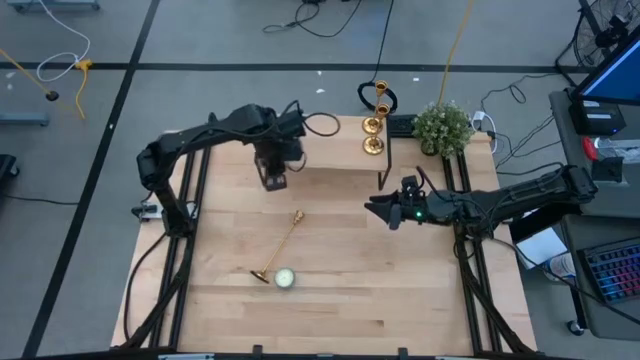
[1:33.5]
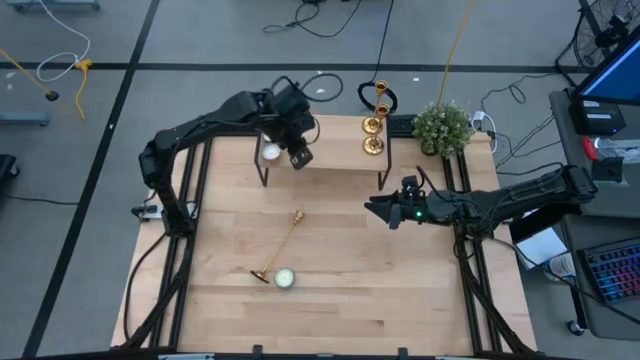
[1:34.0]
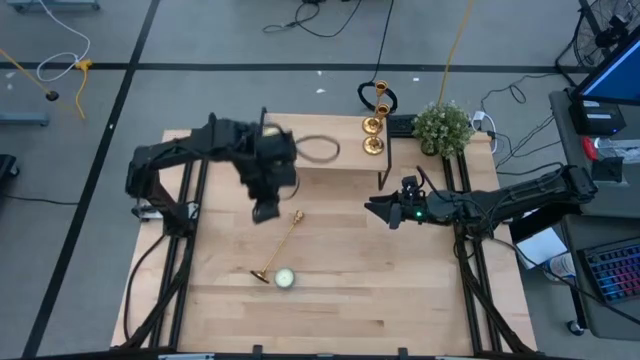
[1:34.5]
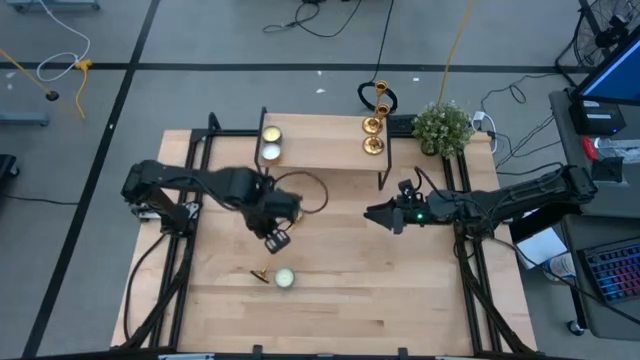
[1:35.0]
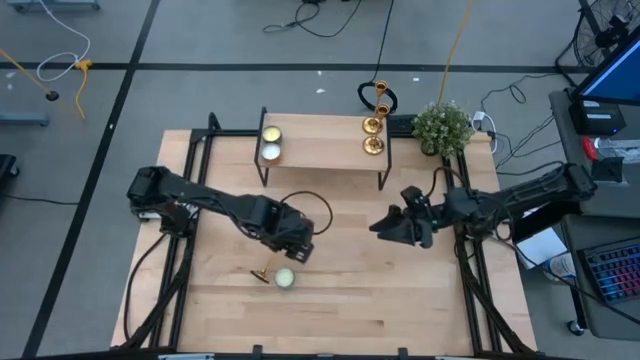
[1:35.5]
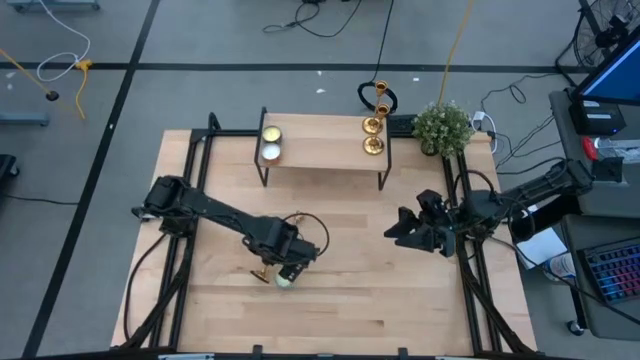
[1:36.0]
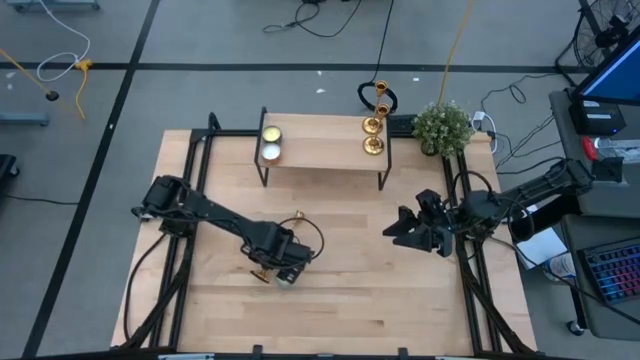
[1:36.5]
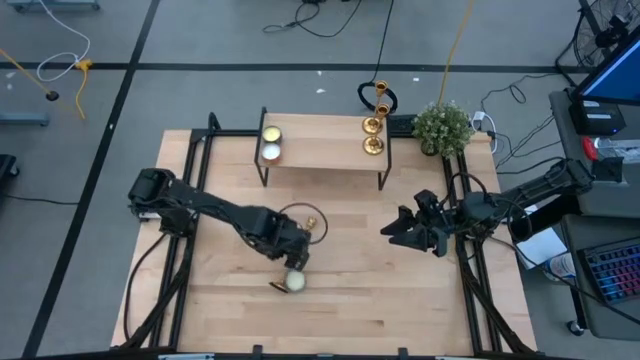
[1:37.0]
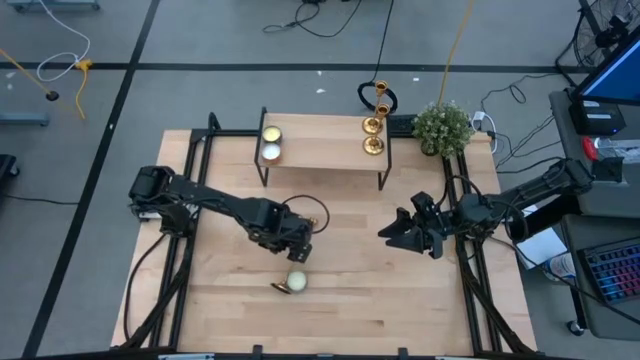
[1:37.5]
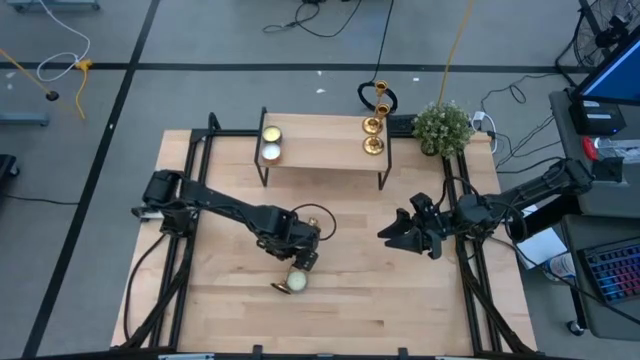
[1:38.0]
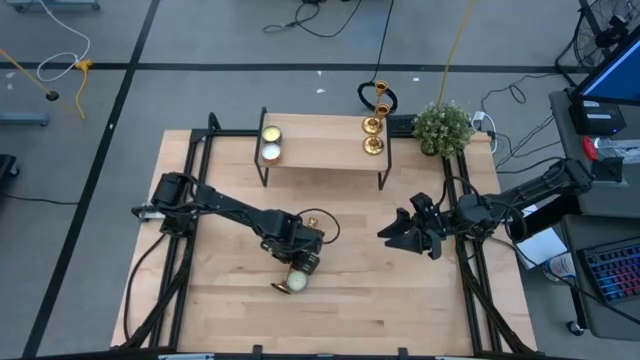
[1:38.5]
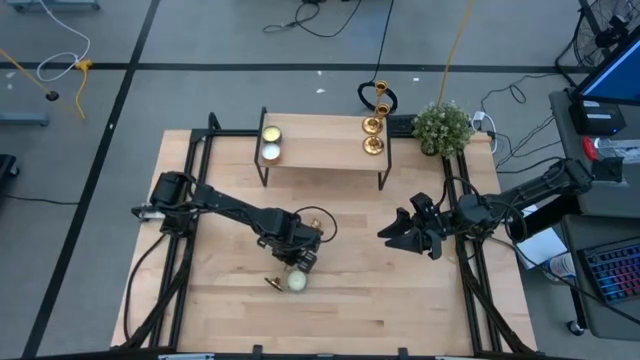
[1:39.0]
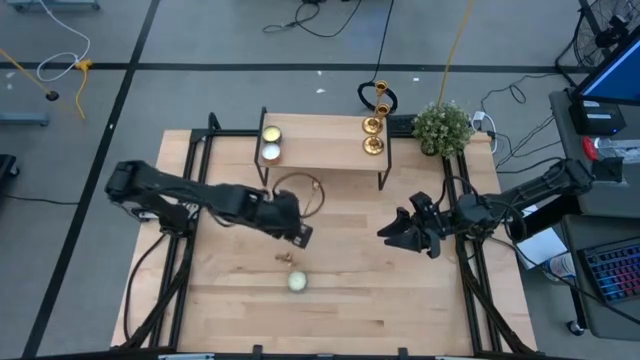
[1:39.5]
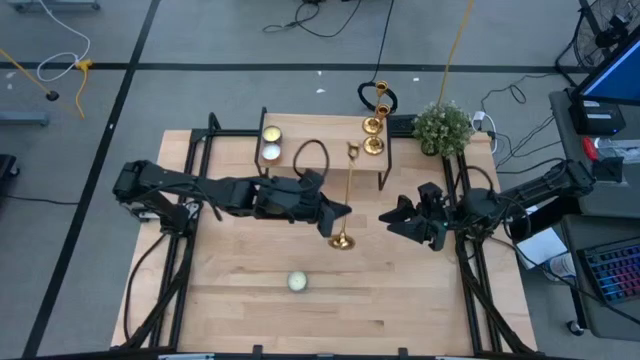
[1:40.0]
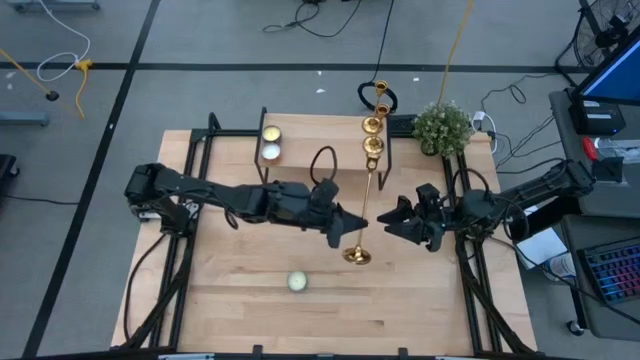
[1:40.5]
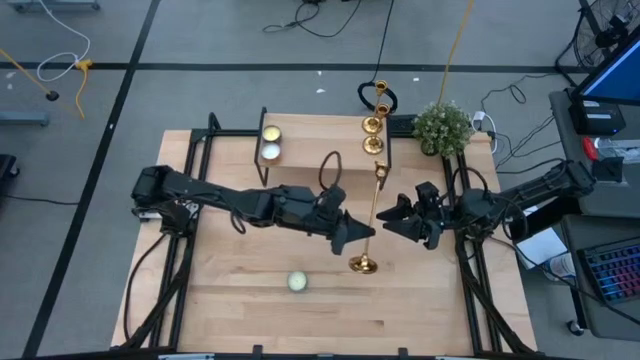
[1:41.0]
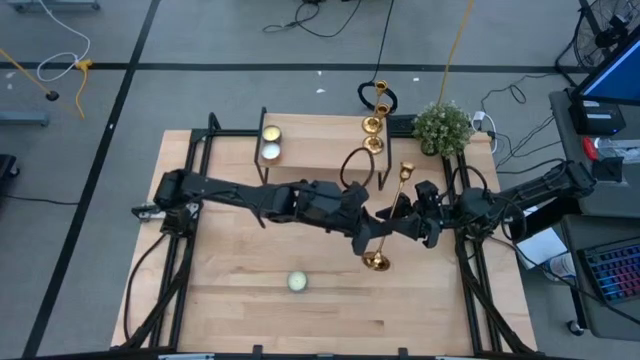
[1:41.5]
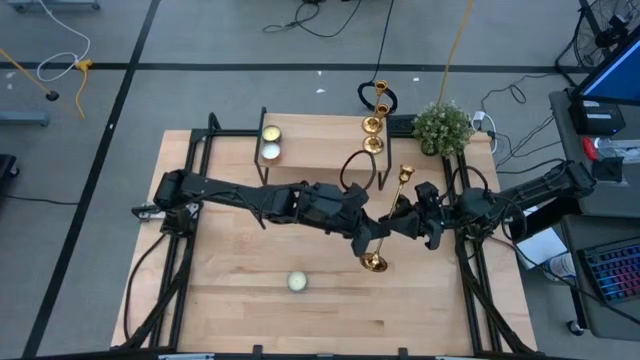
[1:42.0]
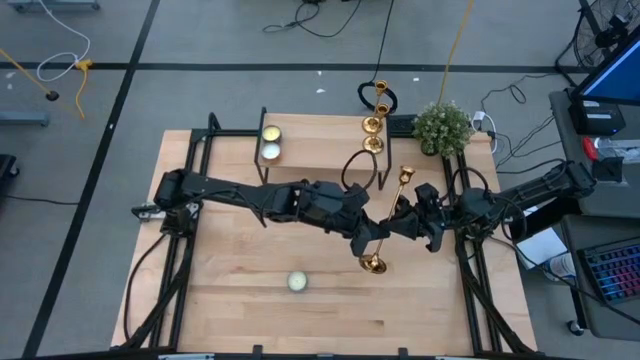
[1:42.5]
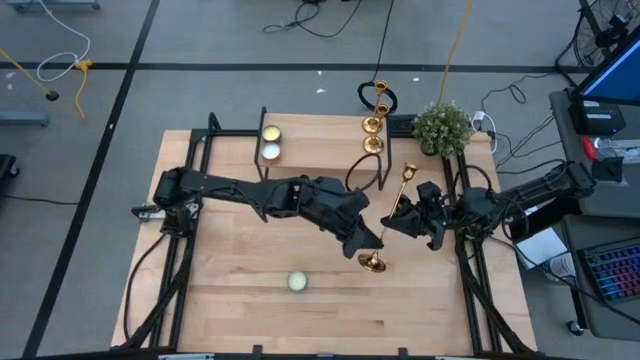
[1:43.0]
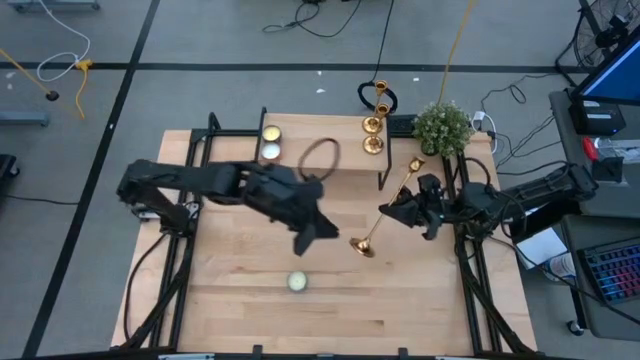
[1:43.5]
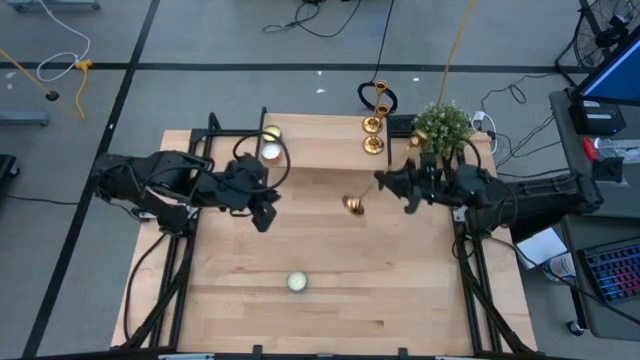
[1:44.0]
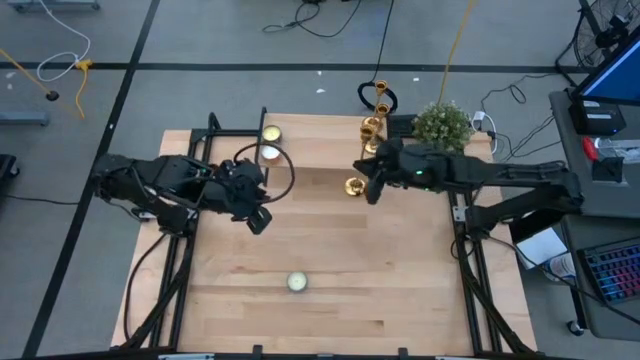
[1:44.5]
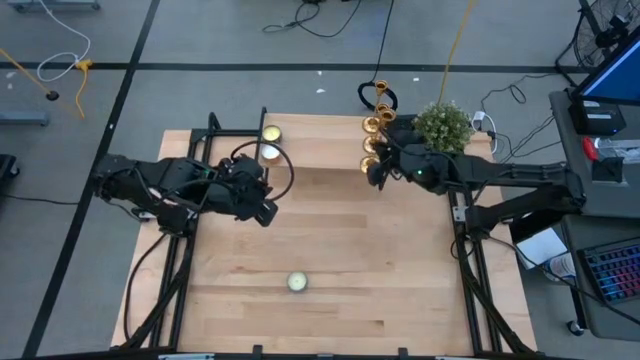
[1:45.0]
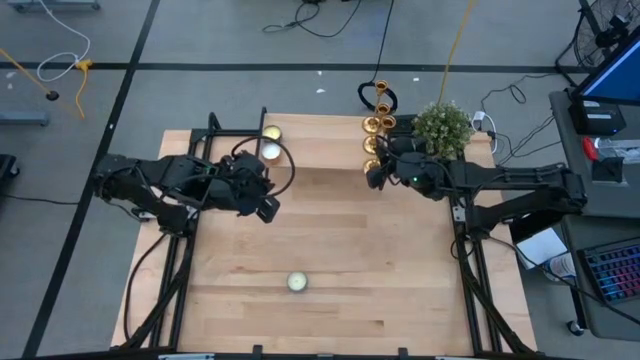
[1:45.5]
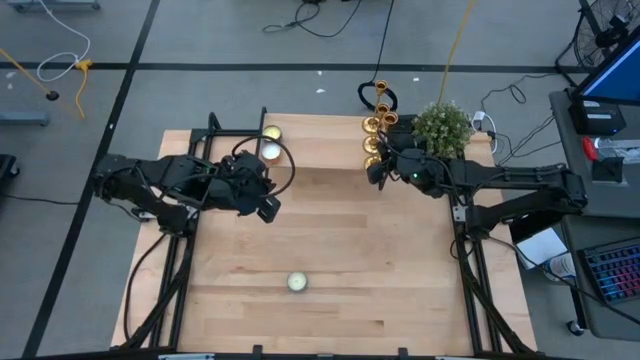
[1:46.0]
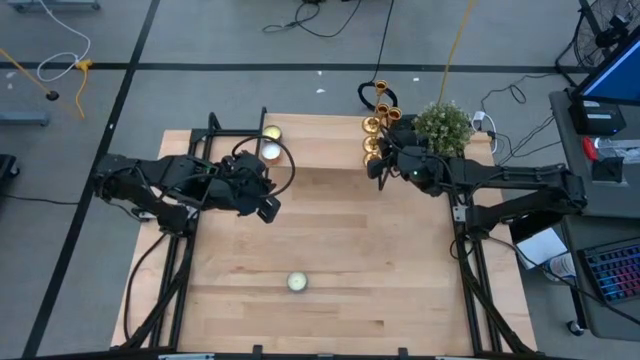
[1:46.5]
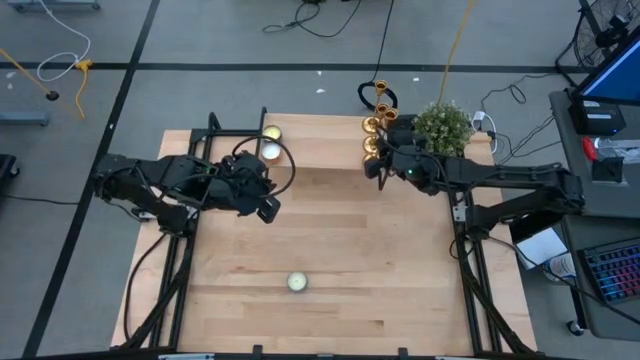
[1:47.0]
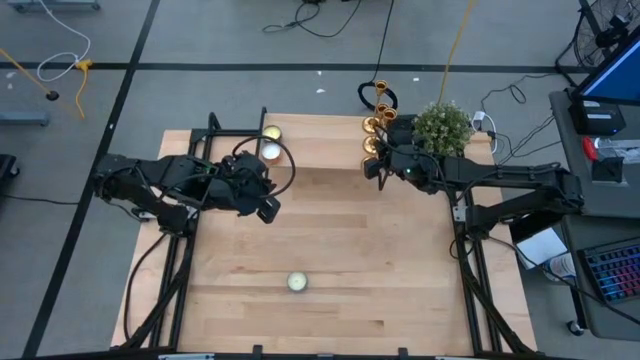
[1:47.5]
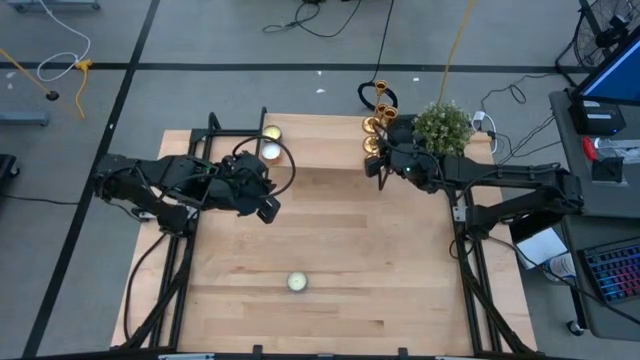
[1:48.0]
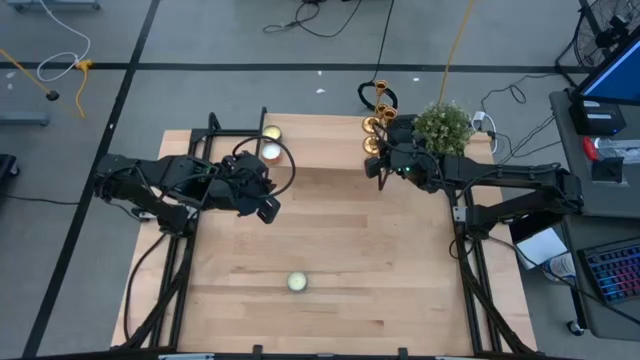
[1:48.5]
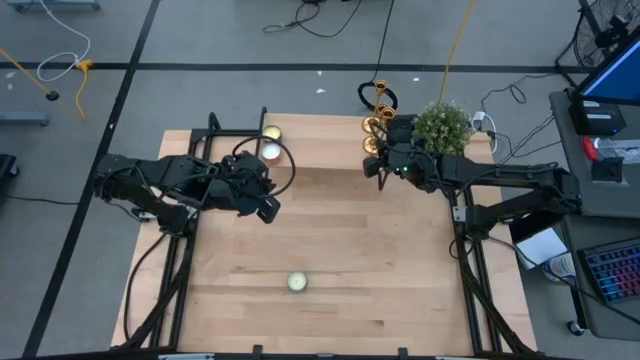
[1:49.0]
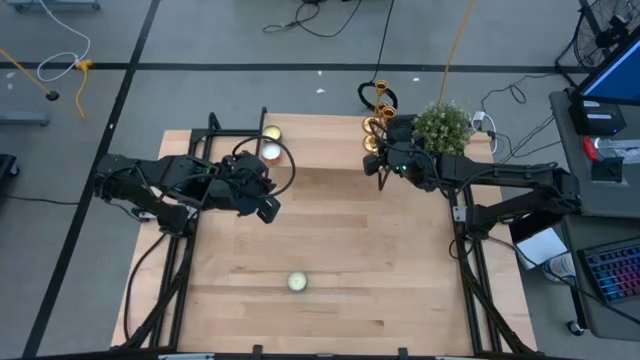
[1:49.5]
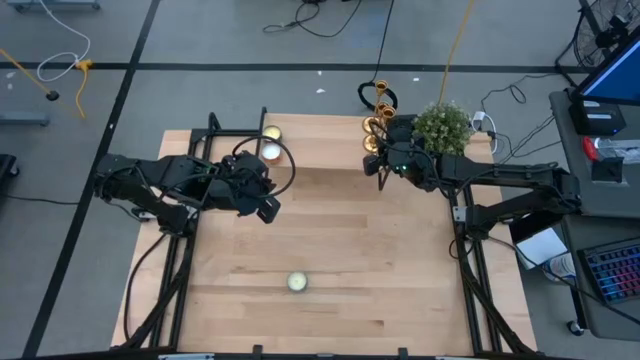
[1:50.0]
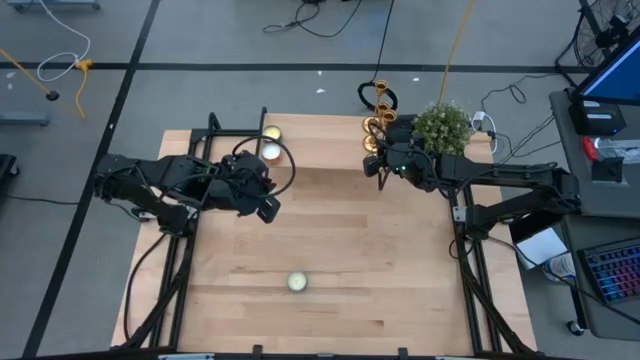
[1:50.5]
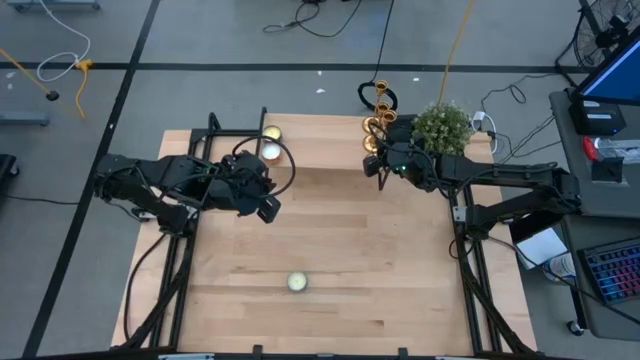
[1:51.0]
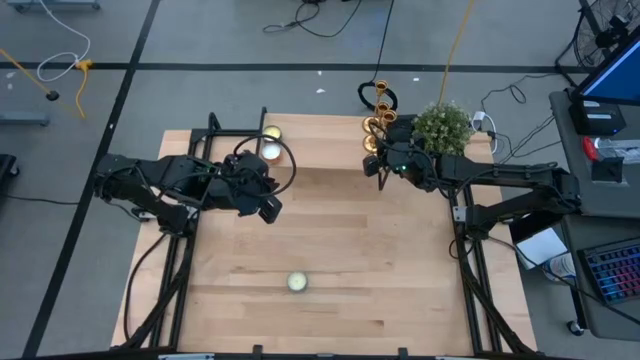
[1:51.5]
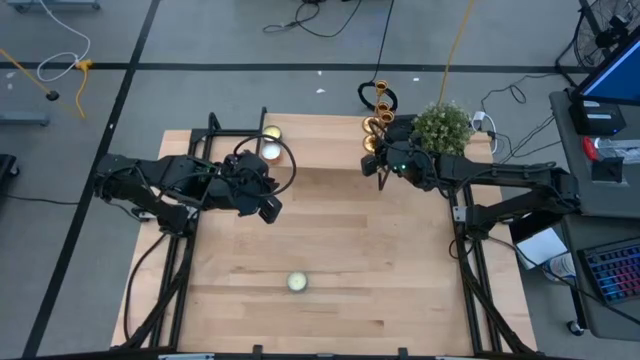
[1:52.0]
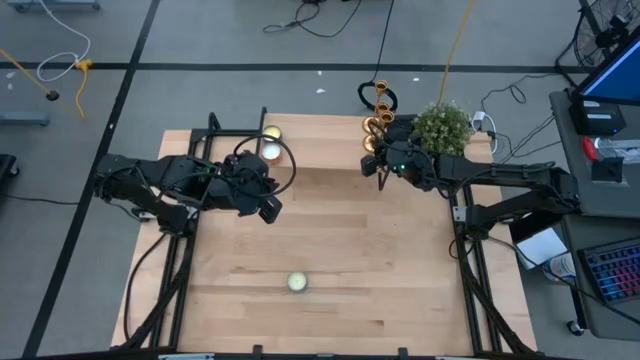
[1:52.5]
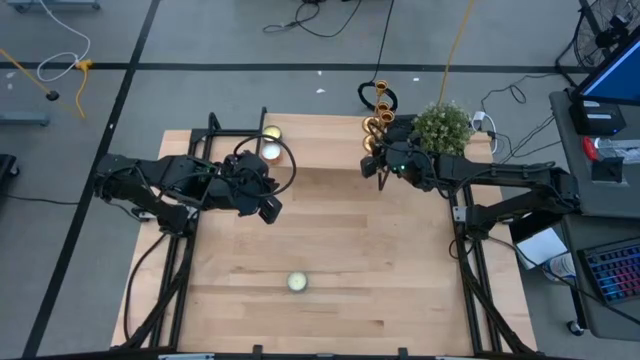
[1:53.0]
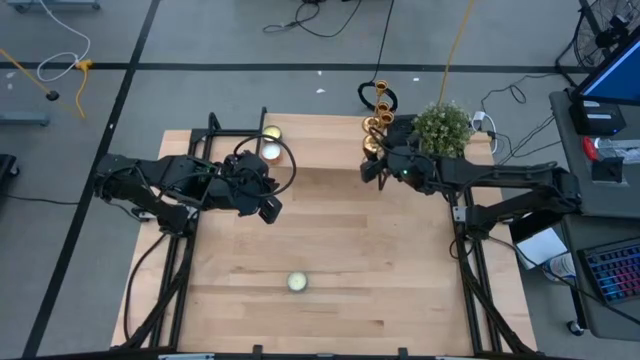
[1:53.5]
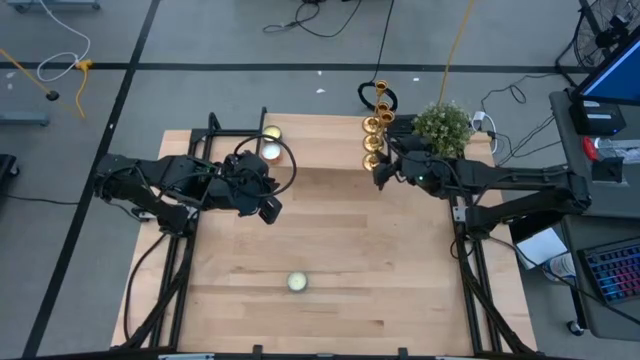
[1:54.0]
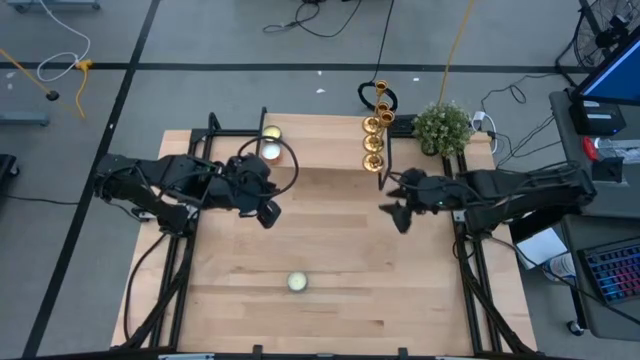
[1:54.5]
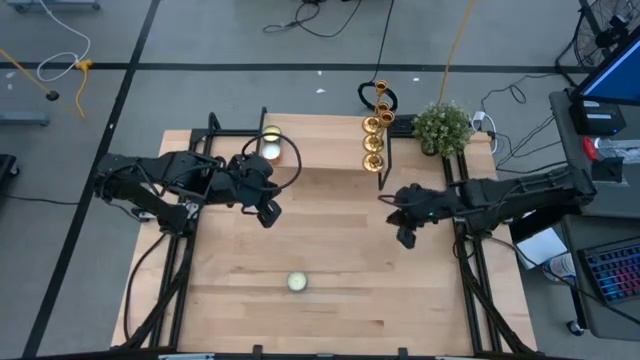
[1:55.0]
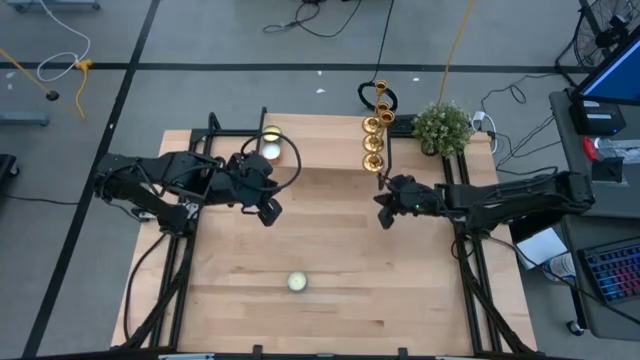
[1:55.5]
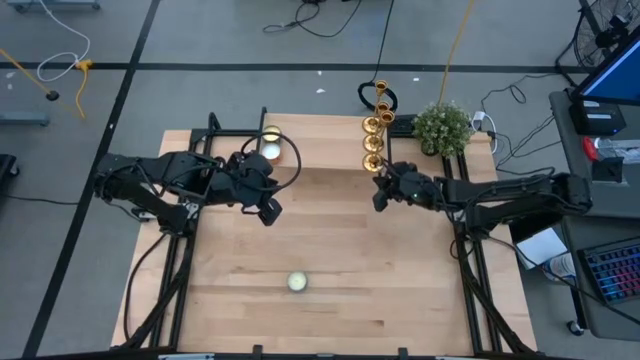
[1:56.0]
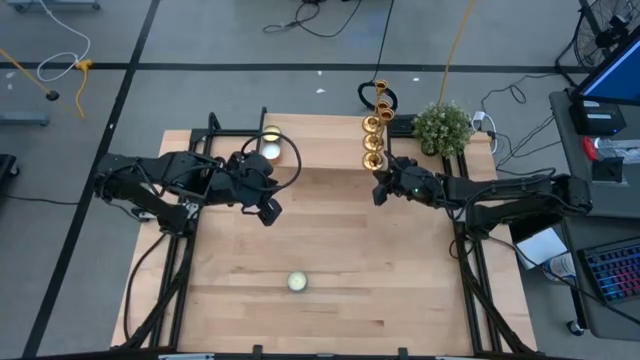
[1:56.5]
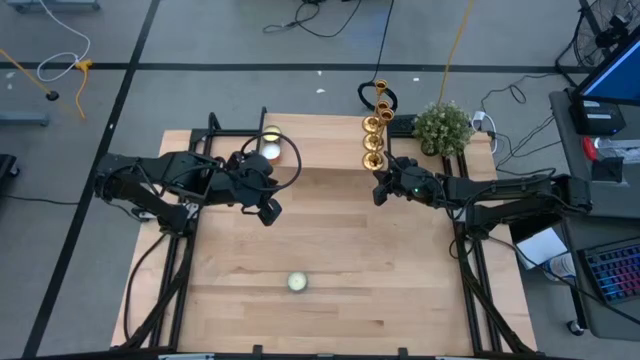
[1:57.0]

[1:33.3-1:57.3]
Task: Pick & Place candle stick holders
Put the candle holder aligned with the other candle holder on the shelf
